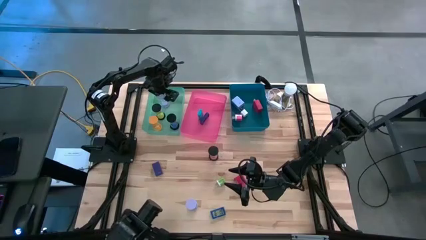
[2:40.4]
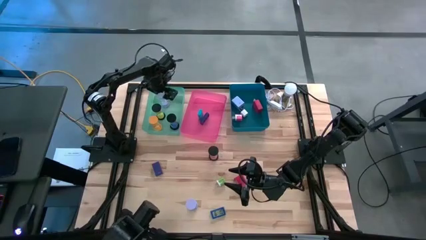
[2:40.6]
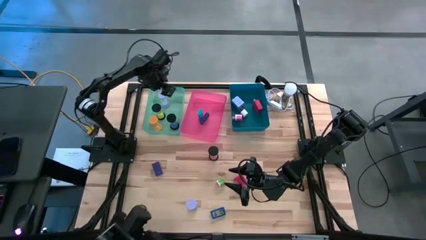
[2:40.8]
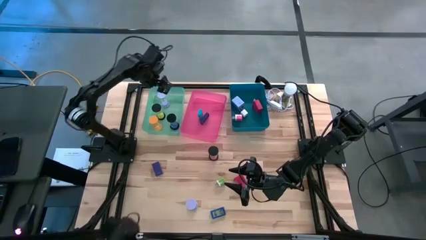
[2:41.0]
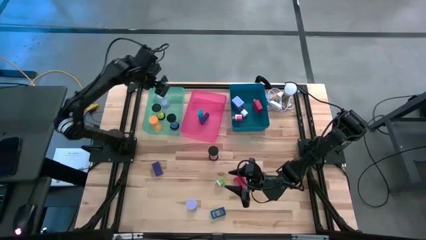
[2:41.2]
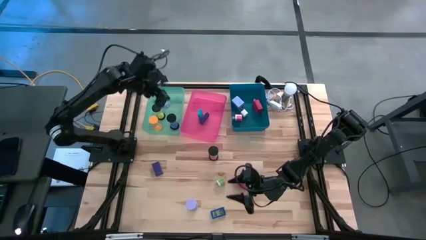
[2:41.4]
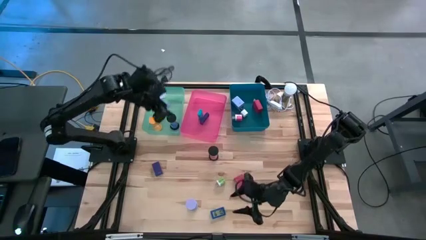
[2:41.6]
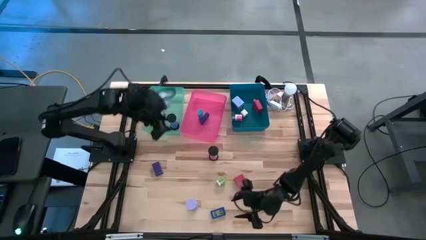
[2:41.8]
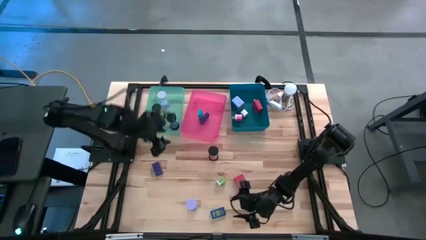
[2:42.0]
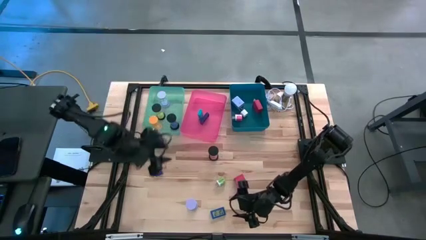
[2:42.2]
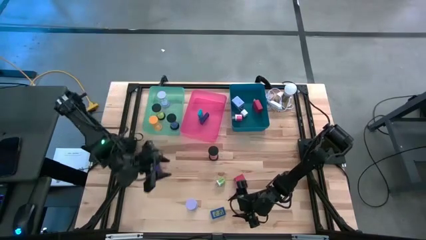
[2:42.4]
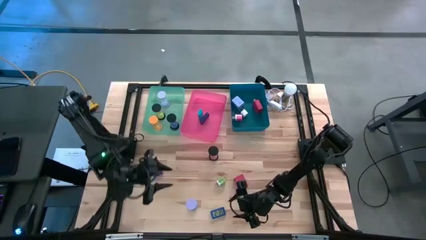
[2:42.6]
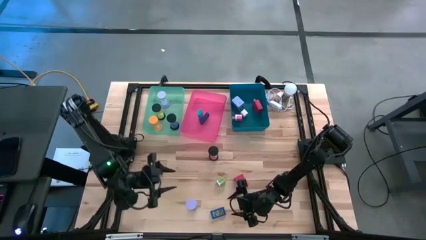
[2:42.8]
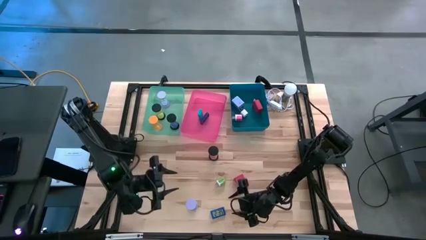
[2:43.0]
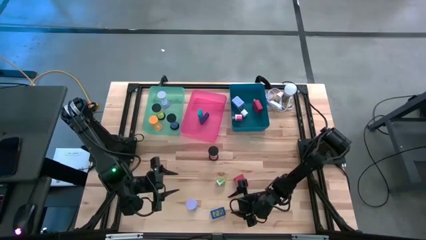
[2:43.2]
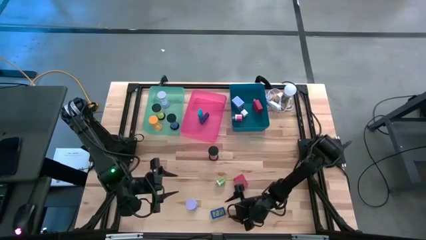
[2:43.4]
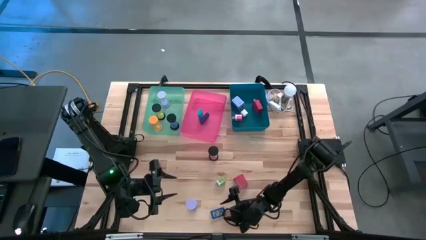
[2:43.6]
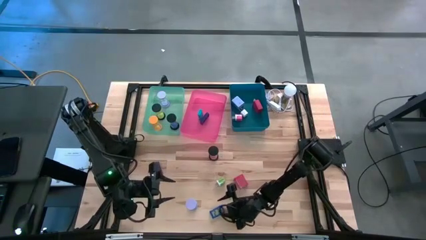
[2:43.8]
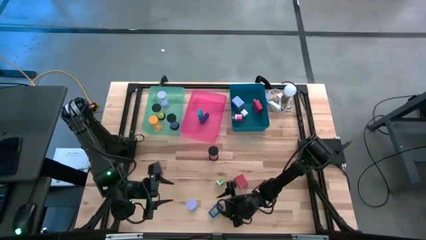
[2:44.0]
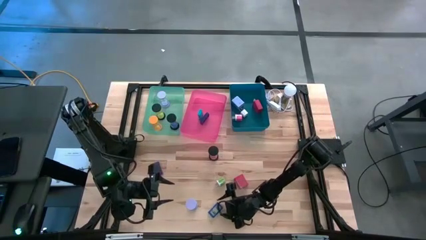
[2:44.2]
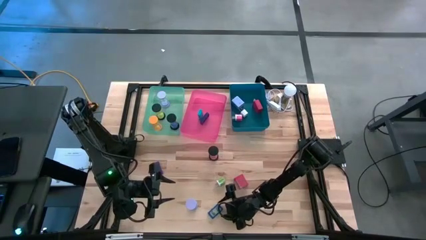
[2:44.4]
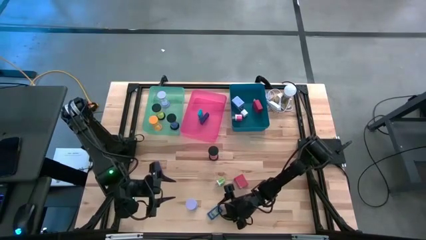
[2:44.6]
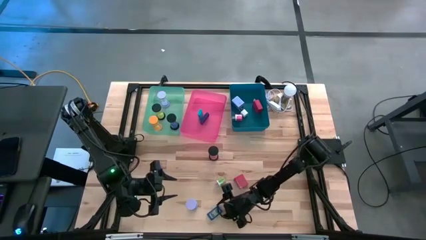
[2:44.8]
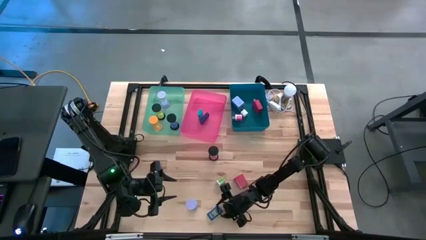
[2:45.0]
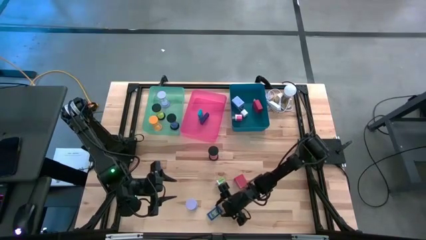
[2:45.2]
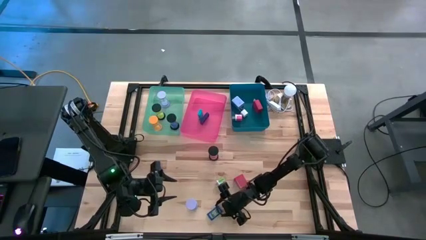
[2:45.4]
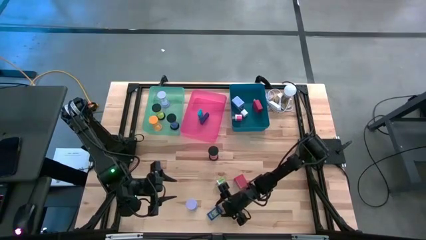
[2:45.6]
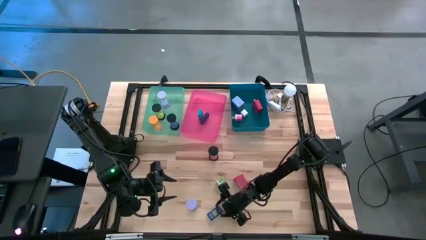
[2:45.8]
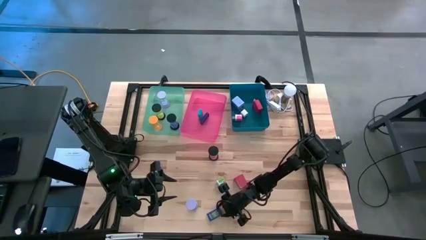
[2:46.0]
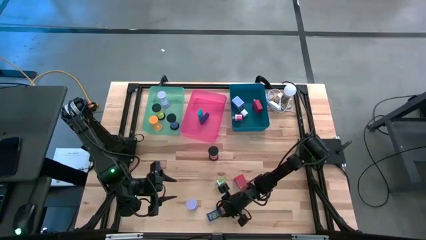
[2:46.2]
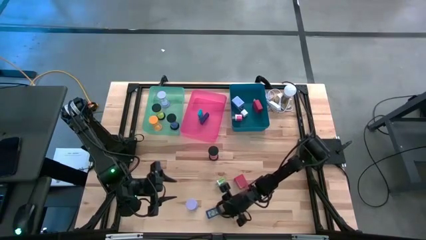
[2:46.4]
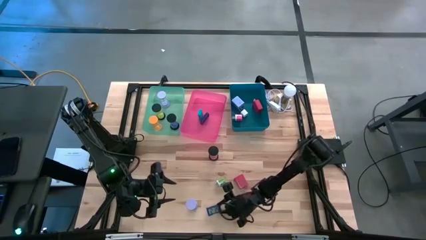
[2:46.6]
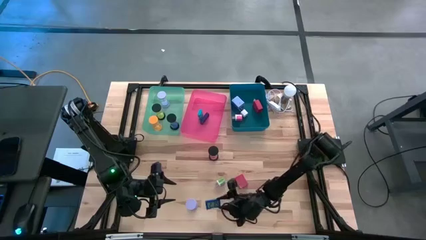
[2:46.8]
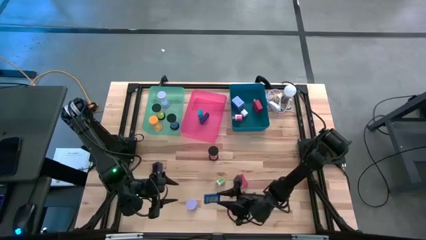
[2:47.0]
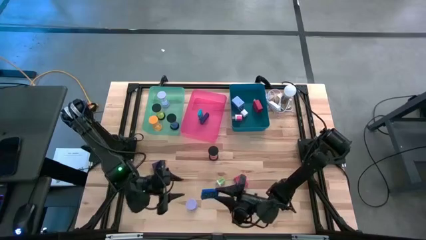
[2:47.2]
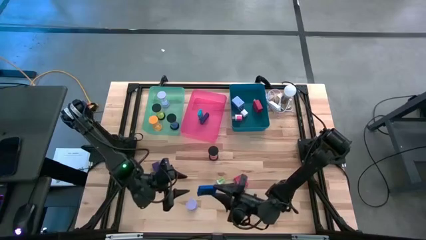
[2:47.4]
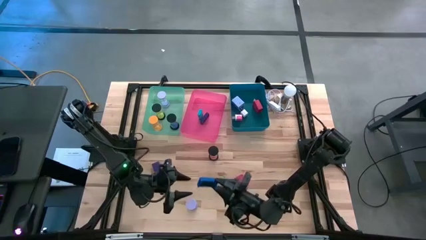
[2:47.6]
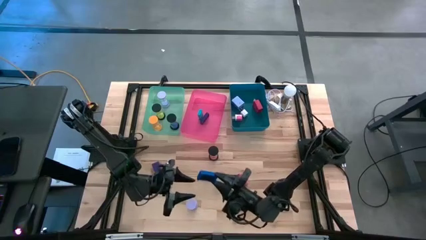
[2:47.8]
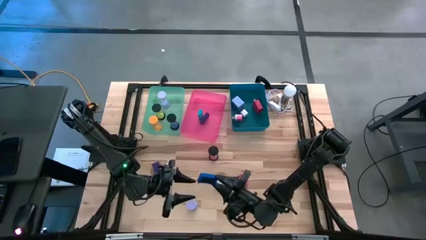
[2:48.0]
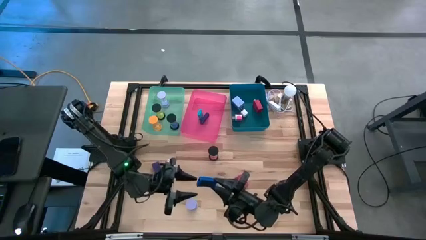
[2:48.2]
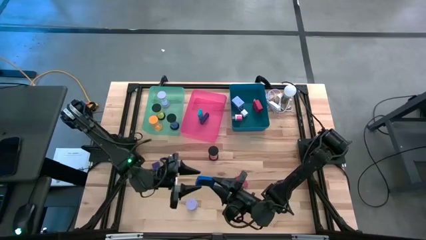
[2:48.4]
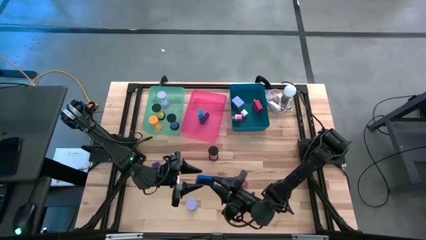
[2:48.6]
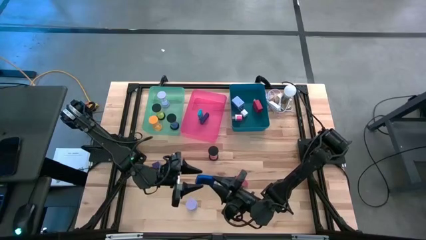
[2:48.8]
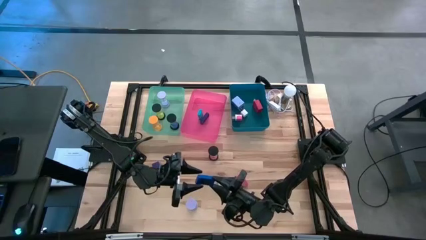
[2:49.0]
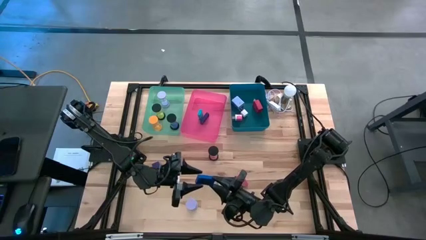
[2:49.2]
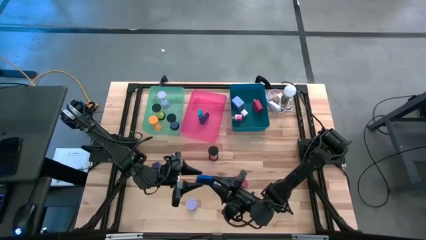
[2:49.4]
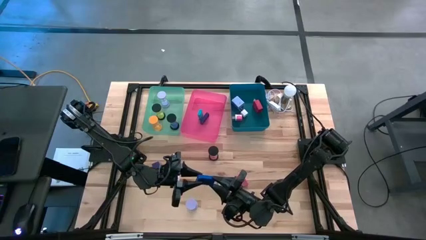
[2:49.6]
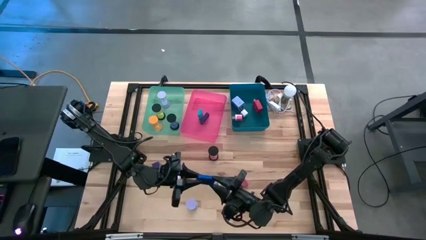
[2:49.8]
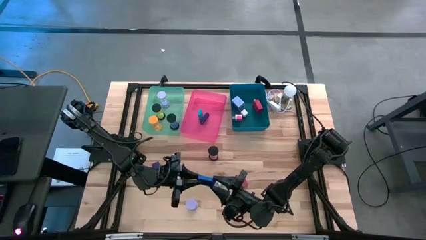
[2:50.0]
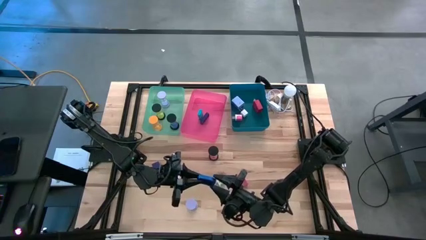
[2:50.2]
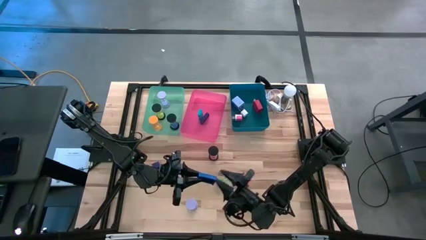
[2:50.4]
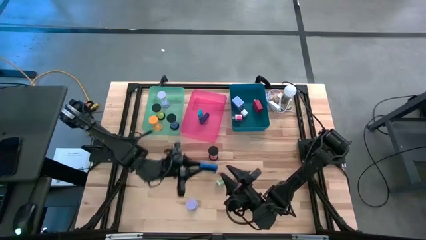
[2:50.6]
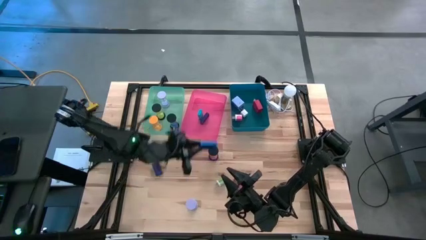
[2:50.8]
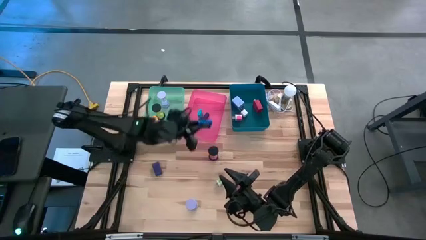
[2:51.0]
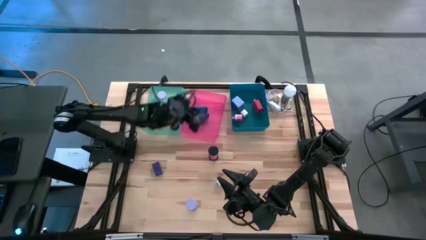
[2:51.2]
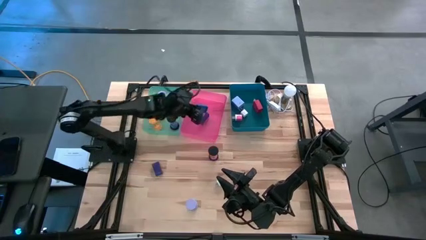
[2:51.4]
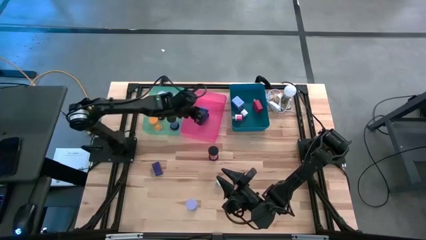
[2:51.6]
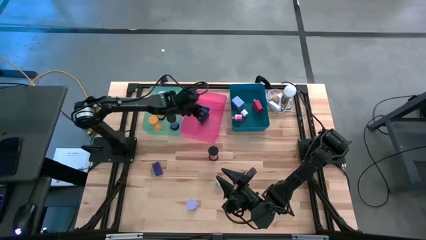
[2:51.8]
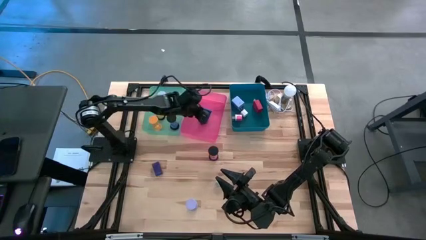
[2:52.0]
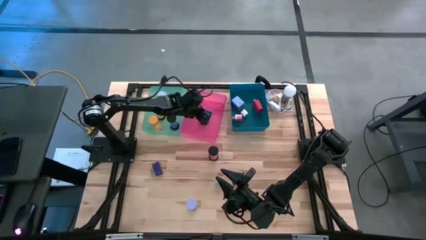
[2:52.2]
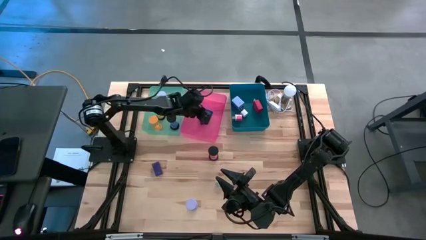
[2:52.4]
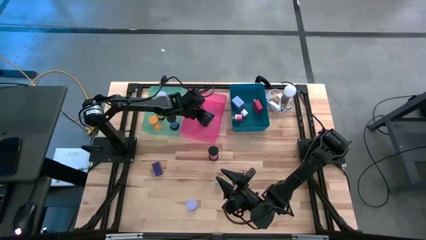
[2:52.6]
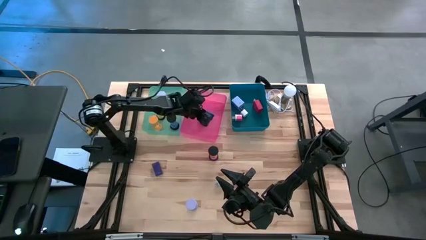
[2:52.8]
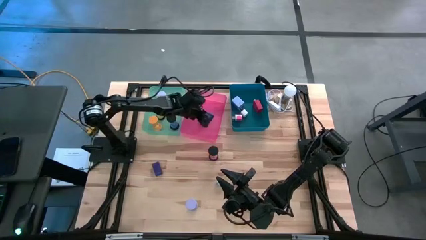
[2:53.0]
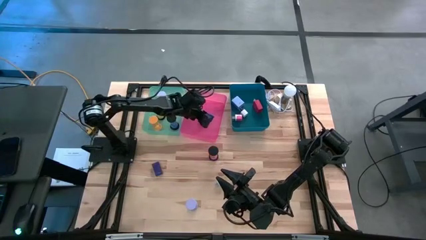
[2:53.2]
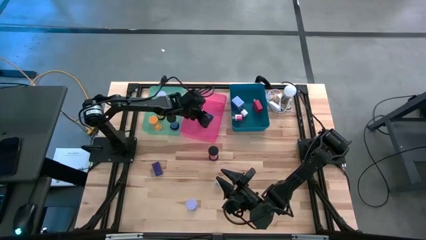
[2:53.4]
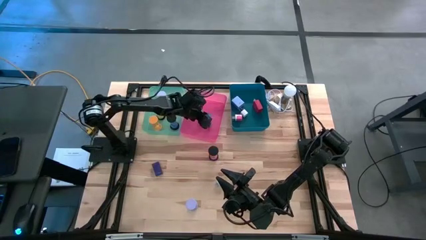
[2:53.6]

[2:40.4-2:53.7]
Task: Pick & Place Office items
Put the blue digital clock into the pink bin
